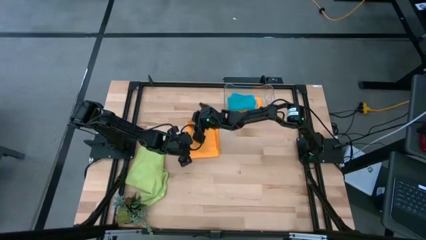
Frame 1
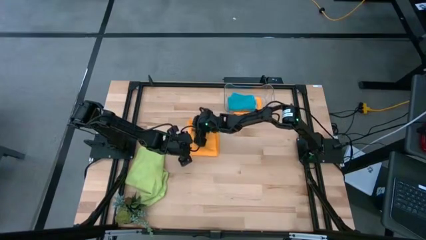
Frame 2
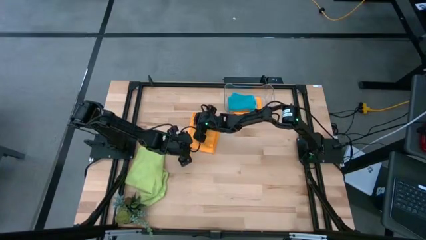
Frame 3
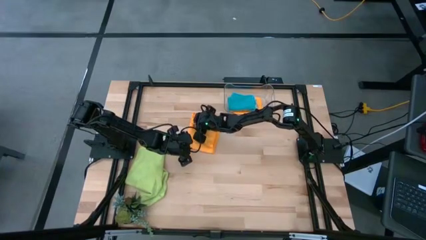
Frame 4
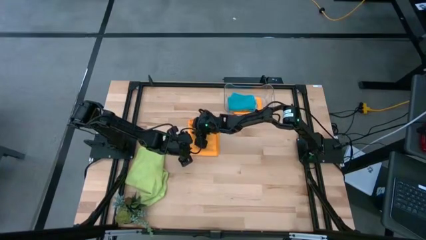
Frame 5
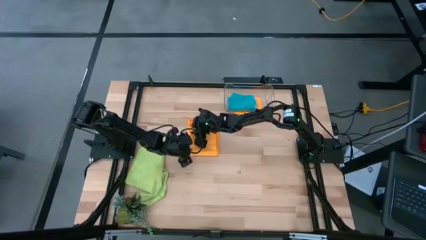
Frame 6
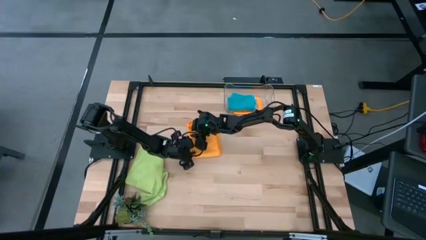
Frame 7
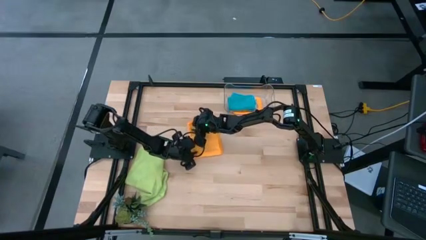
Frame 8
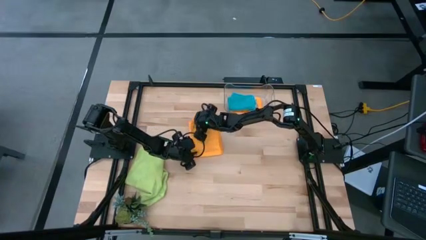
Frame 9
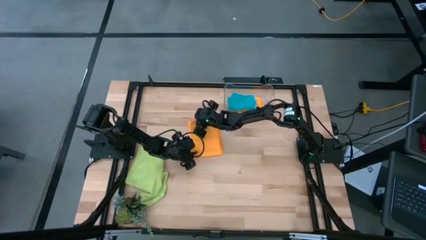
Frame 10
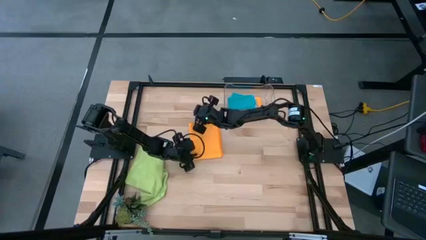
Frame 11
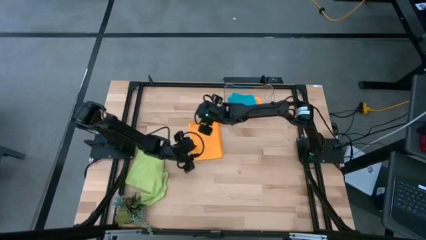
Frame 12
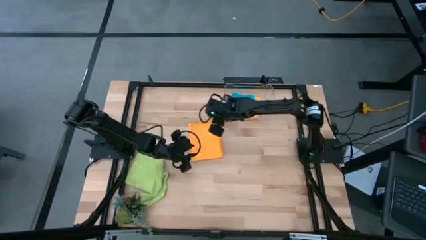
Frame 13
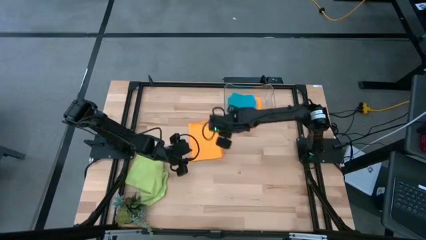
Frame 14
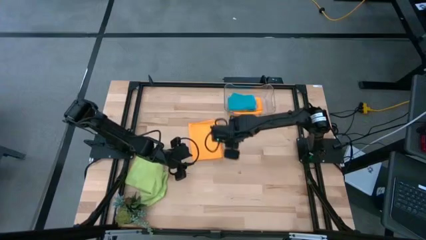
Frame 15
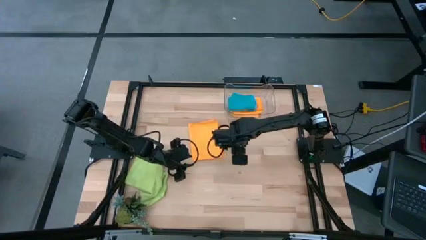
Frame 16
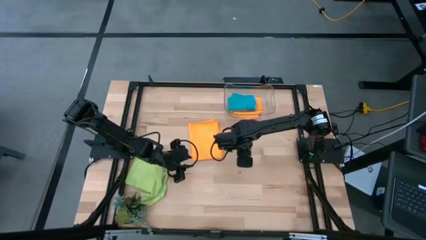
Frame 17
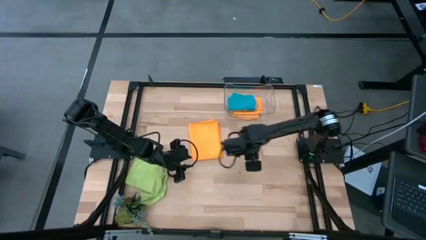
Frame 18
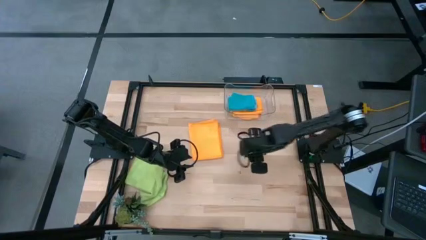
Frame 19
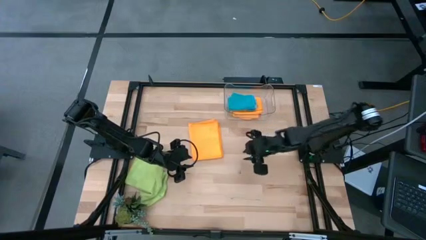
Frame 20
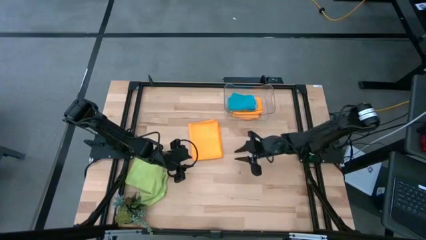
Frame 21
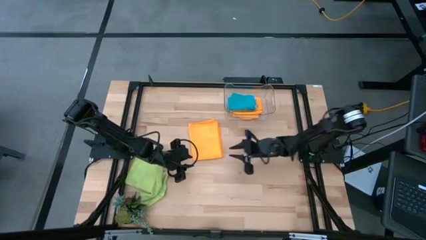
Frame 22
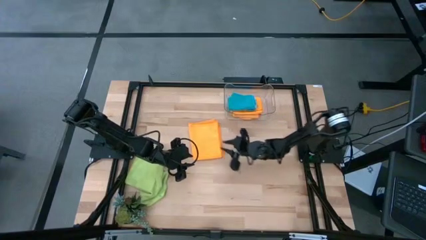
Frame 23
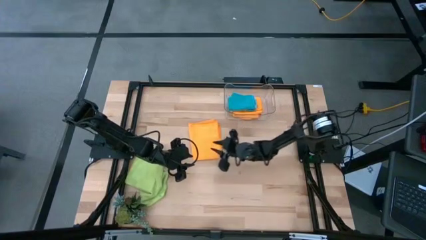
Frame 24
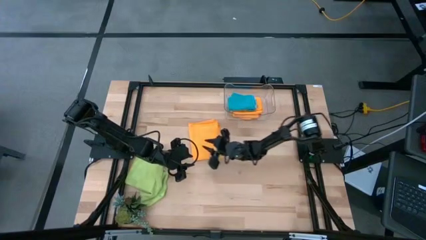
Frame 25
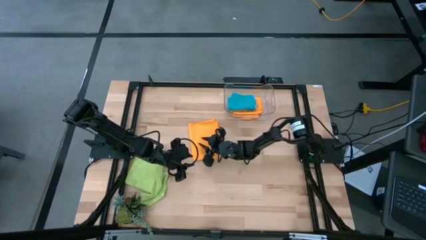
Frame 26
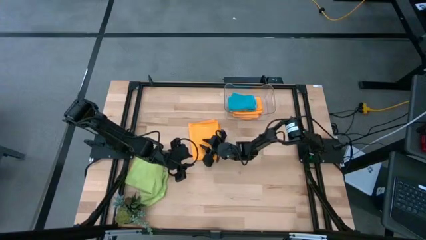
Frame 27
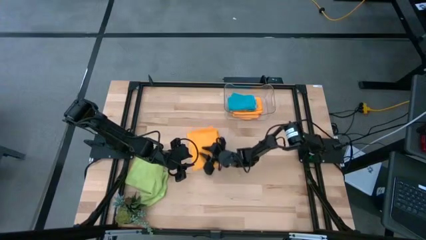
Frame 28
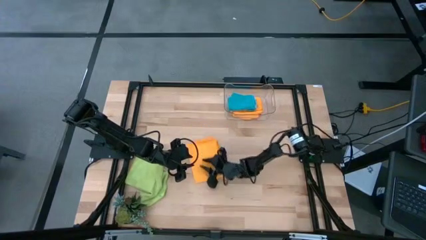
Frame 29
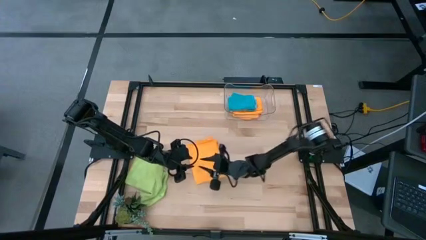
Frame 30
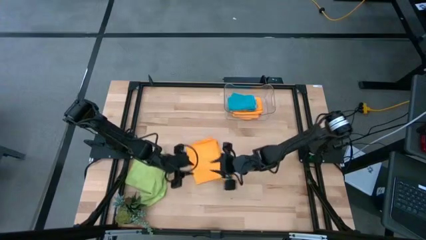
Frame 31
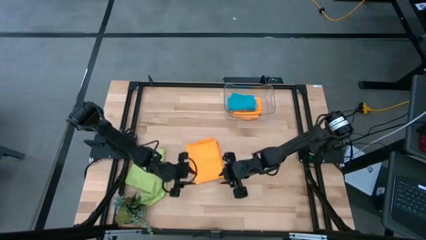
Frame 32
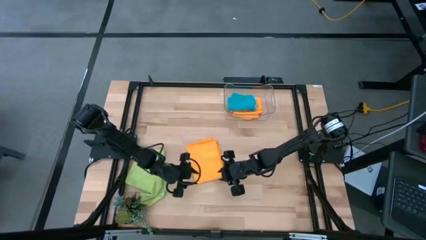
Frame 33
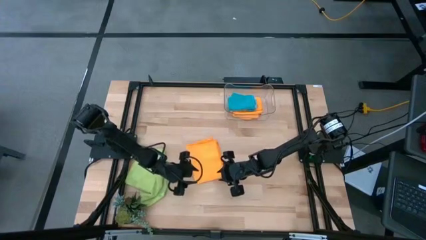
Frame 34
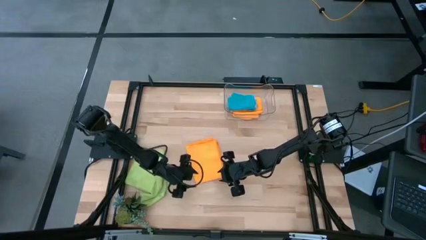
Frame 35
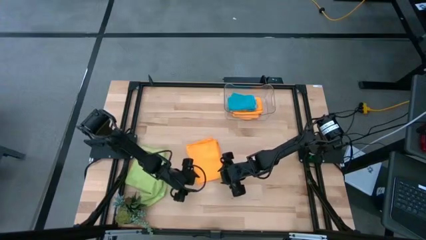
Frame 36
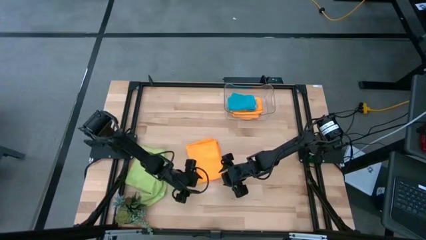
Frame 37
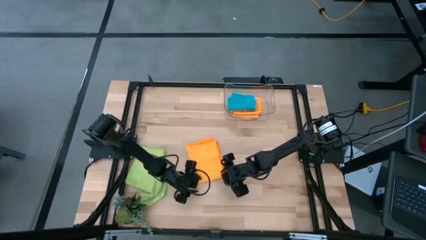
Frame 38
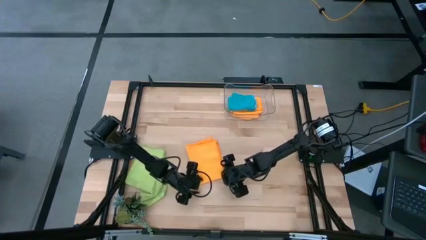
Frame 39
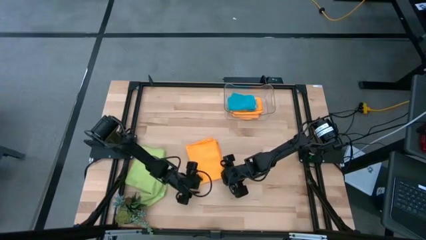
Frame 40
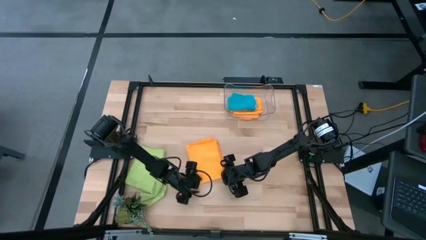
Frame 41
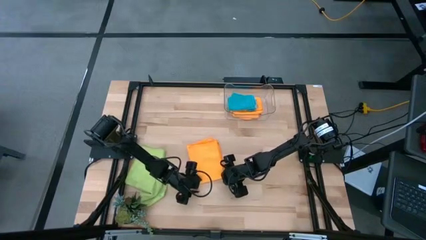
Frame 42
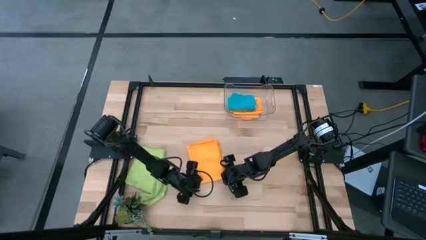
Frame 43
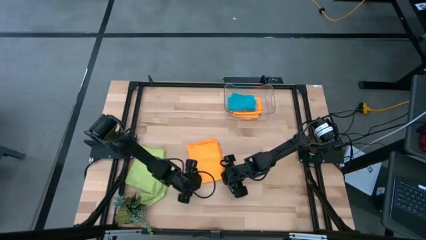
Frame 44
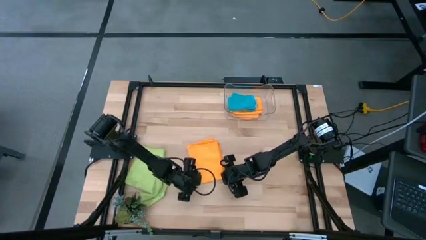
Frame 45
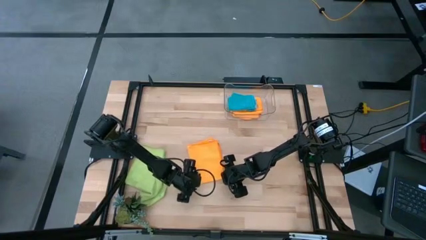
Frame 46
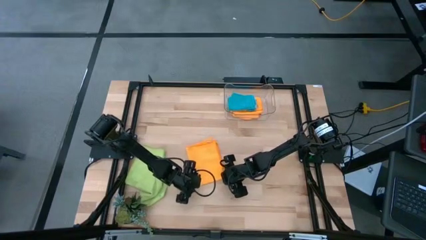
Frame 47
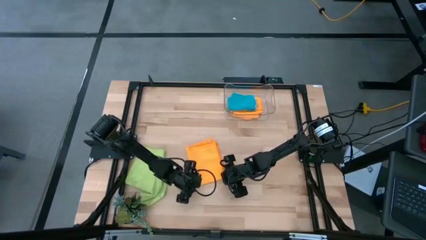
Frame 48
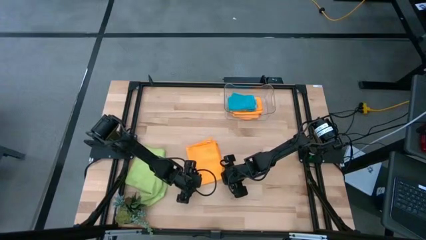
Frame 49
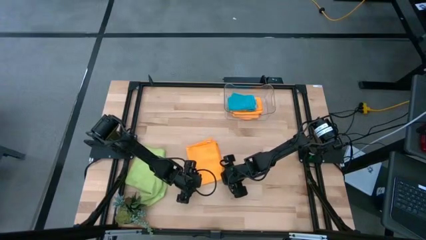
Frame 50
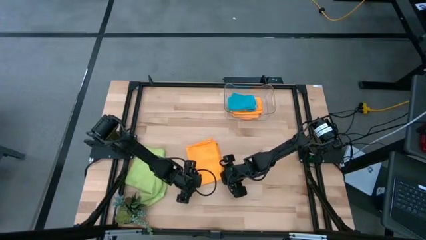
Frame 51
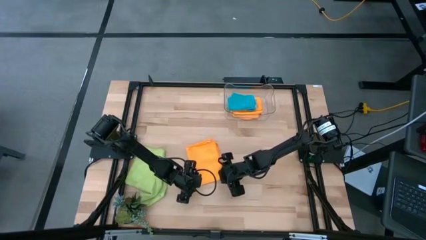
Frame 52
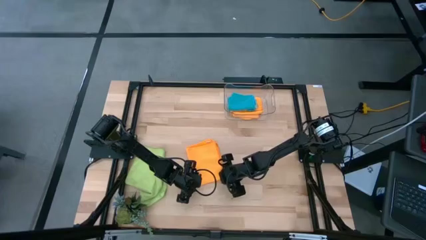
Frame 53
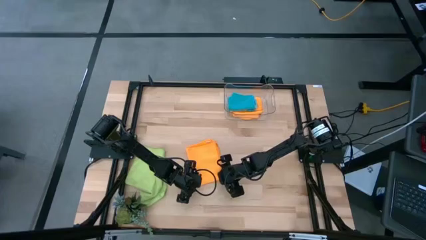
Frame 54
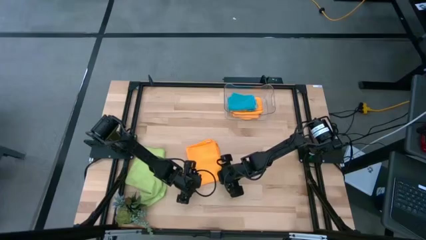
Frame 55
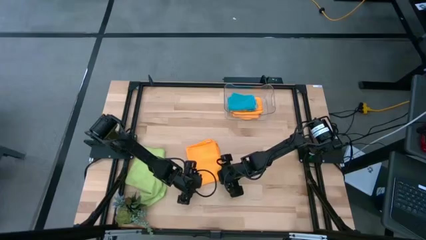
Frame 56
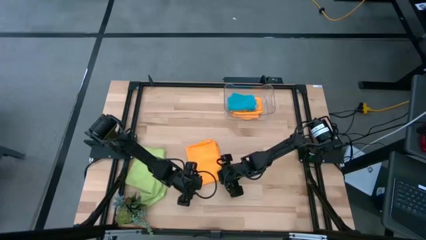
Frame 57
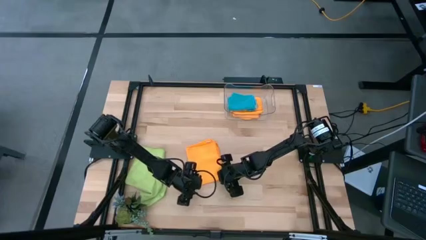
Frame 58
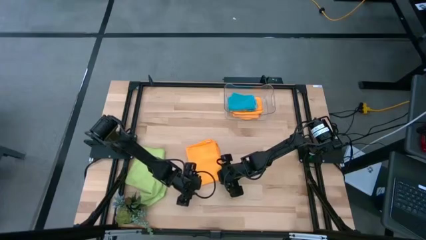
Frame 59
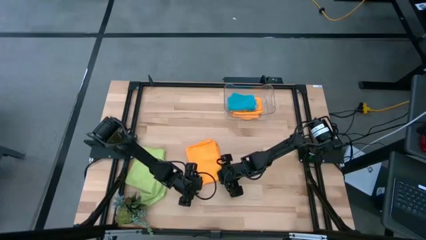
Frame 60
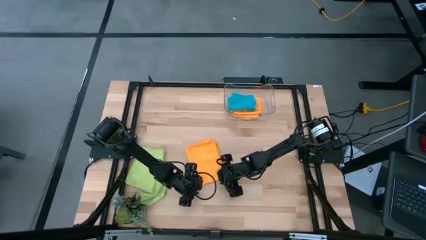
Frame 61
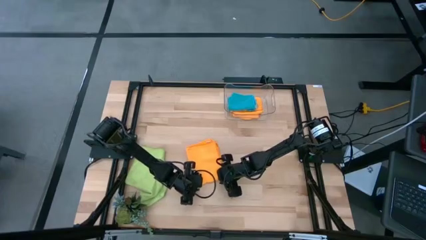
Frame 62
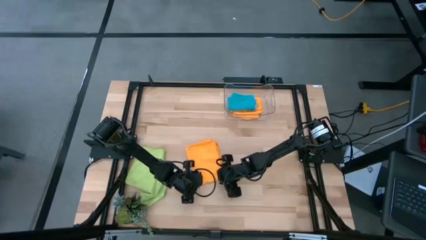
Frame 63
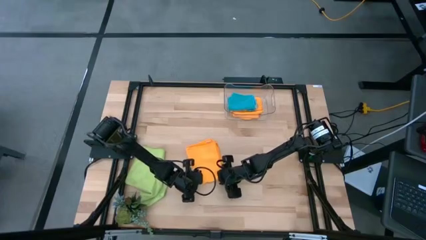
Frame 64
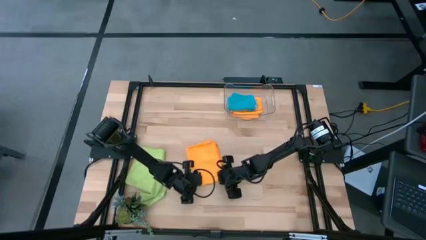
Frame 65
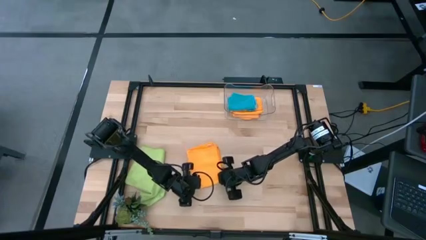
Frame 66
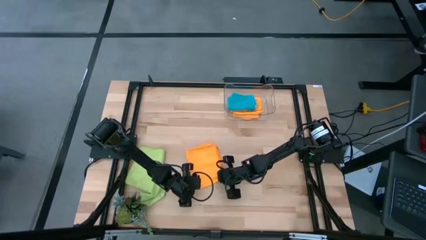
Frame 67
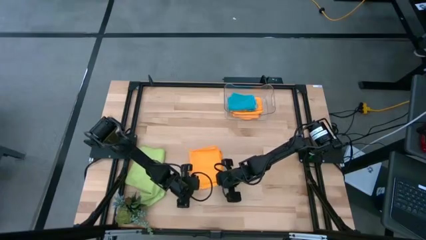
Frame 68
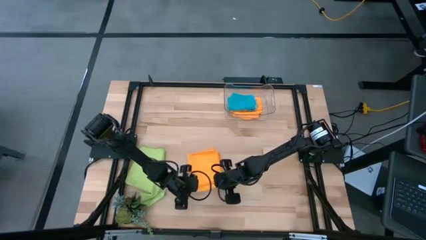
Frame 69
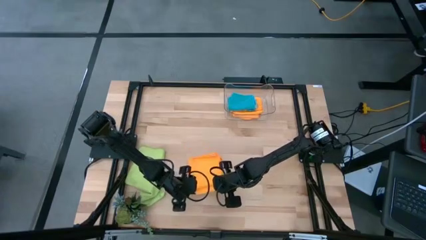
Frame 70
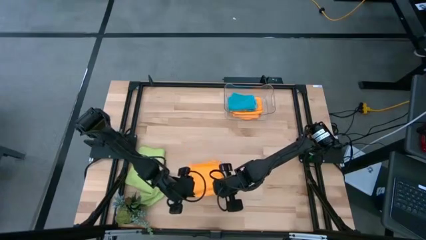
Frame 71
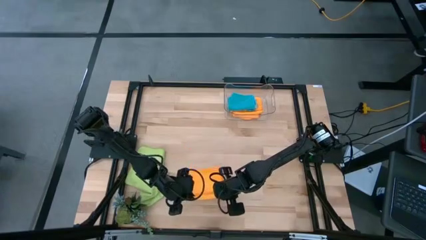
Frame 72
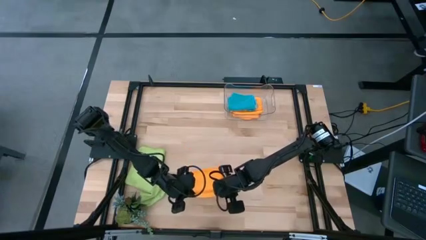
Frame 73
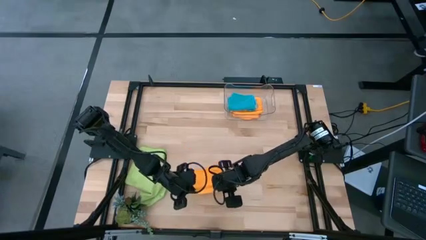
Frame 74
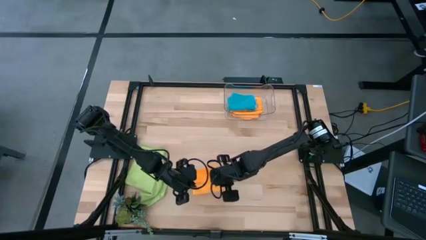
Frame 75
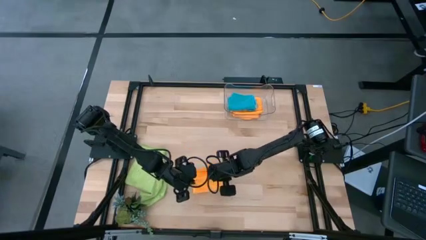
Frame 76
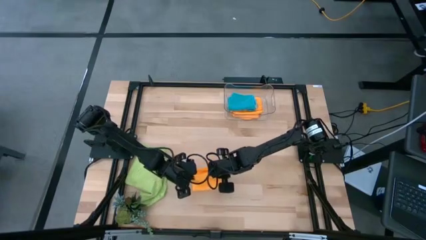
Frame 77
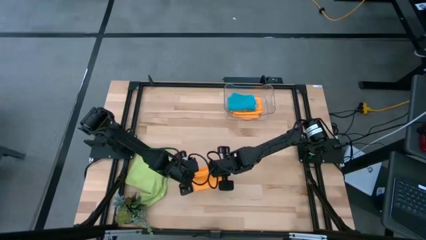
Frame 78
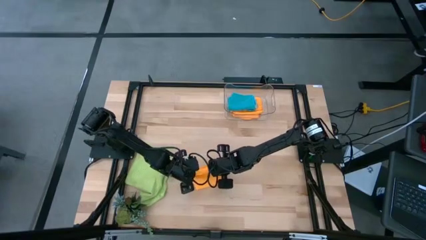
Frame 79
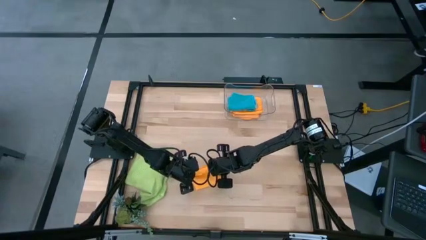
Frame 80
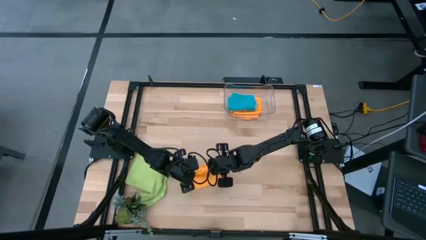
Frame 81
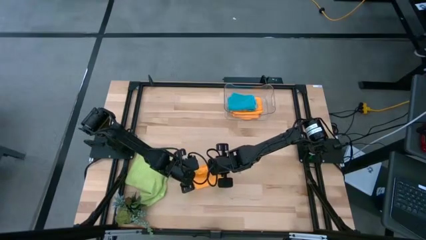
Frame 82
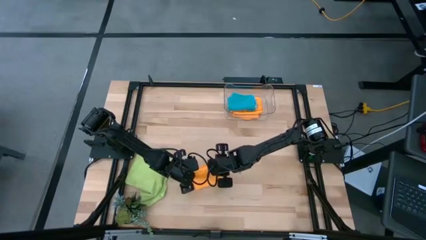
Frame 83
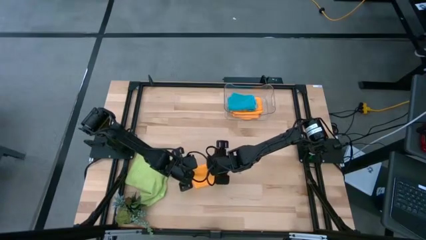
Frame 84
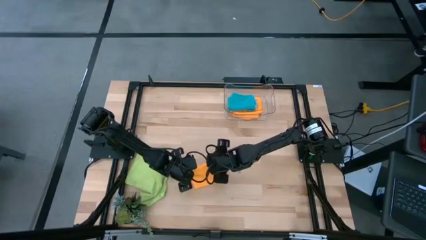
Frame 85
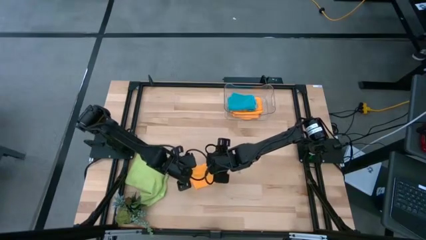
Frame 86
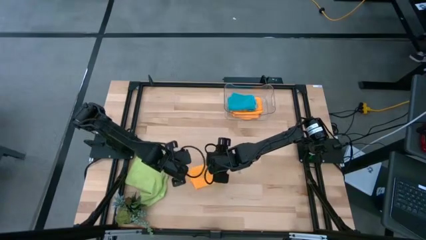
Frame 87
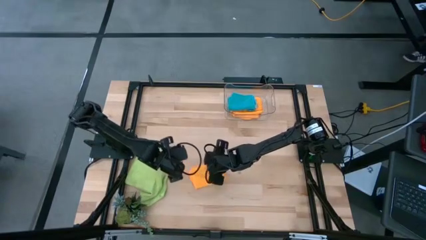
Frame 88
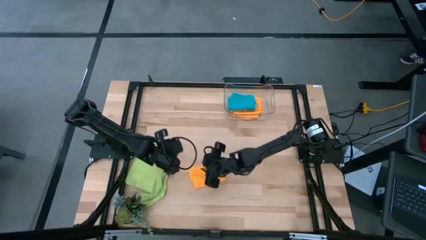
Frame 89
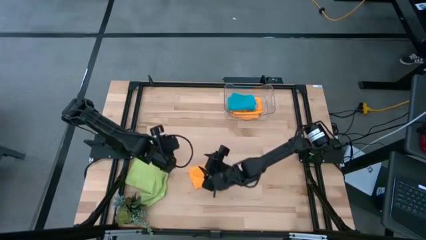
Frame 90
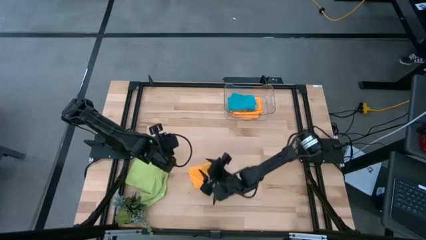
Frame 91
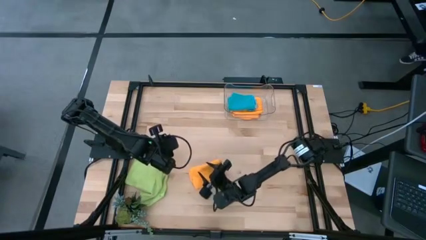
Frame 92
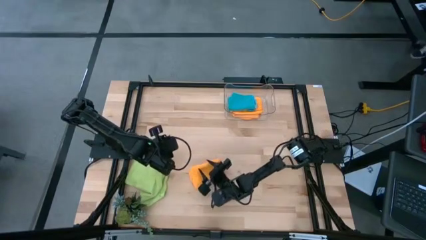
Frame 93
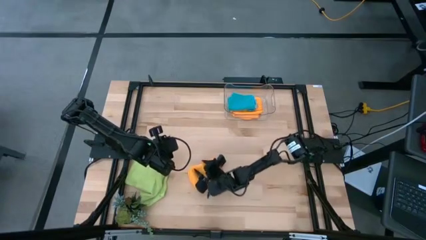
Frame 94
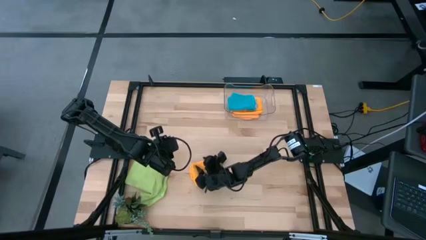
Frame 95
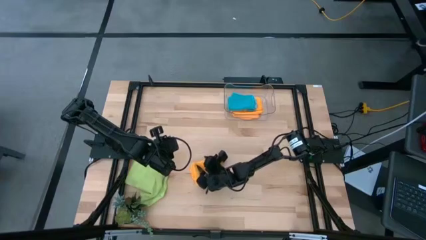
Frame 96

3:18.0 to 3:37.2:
Task: Fold microfiber towels
Fold the orange microfiber towel
